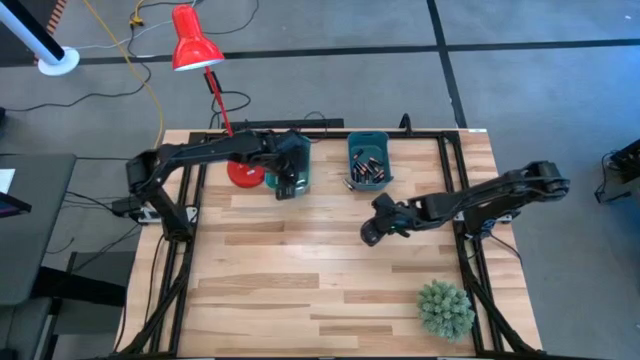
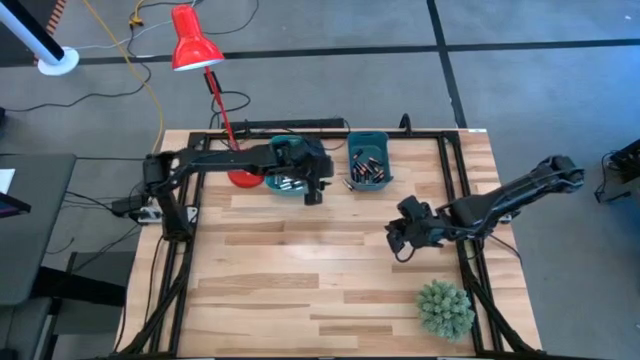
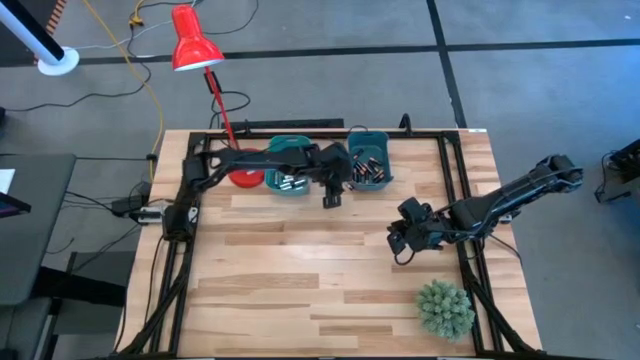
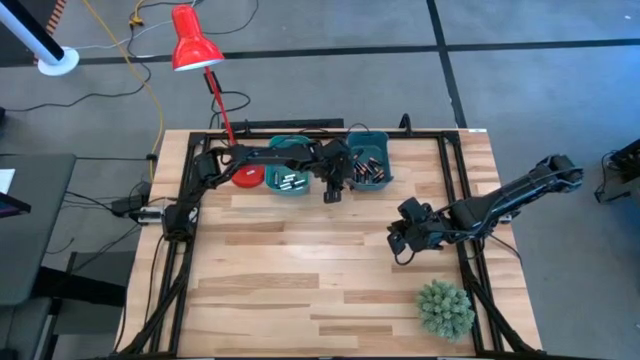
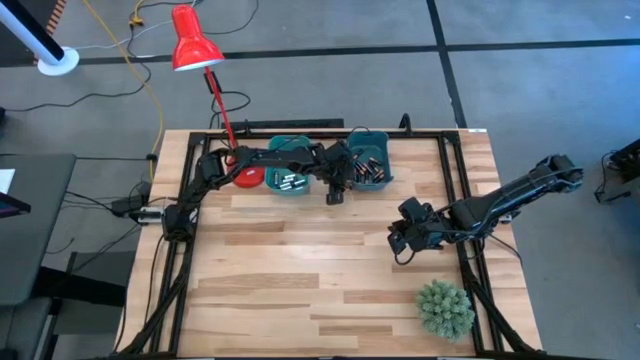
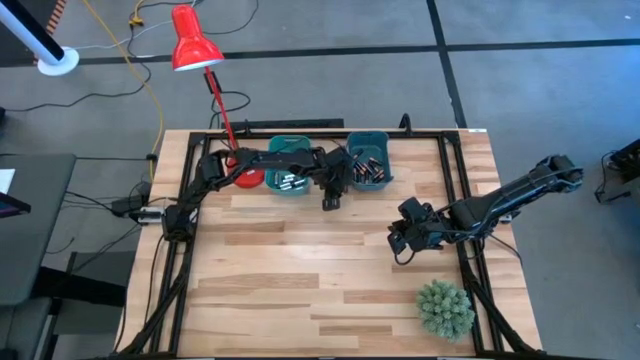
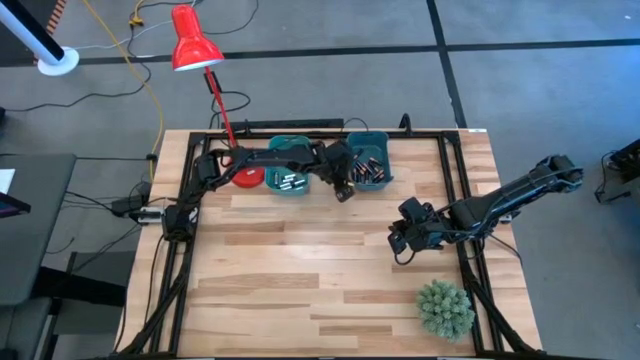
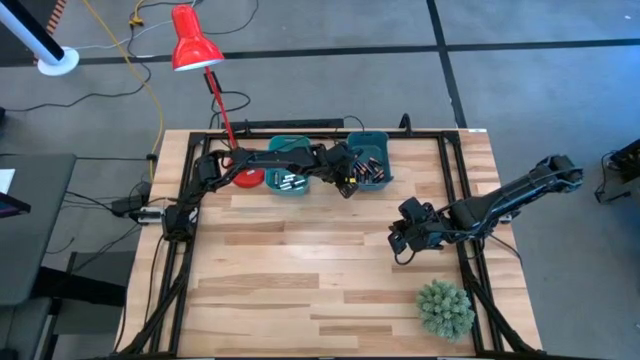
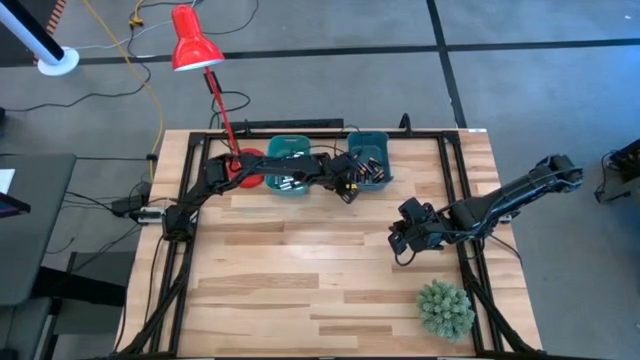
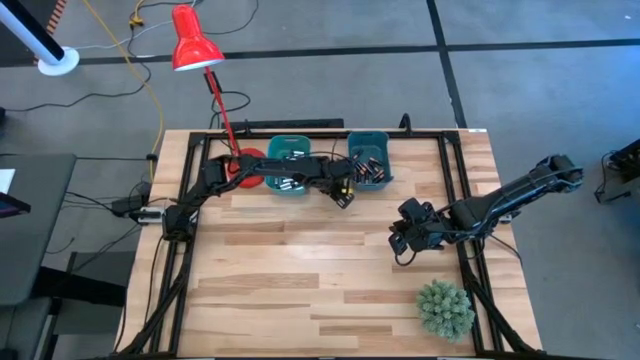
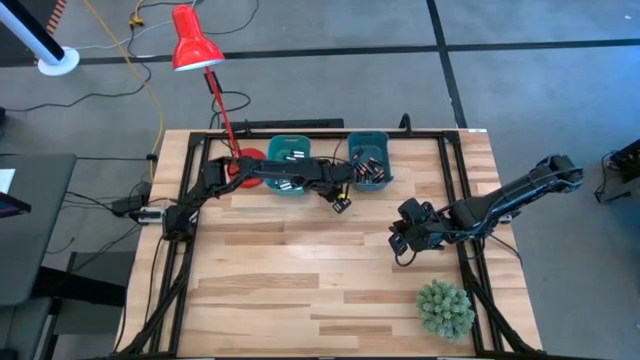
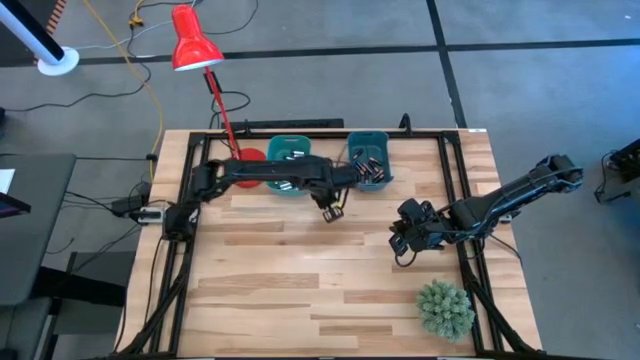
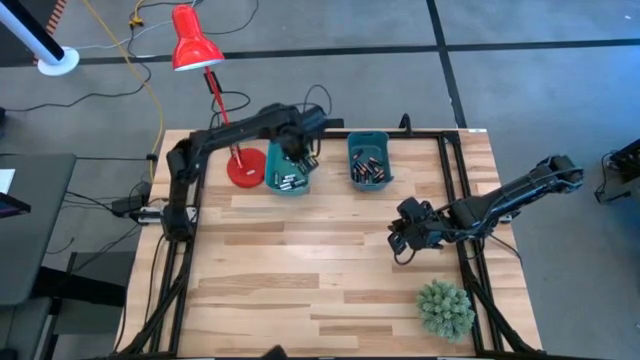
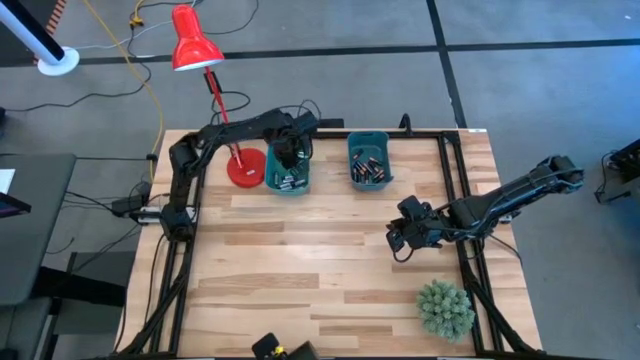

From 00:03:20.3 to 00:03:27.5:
Task: Sort batteries
Put the silver battery into the green bin

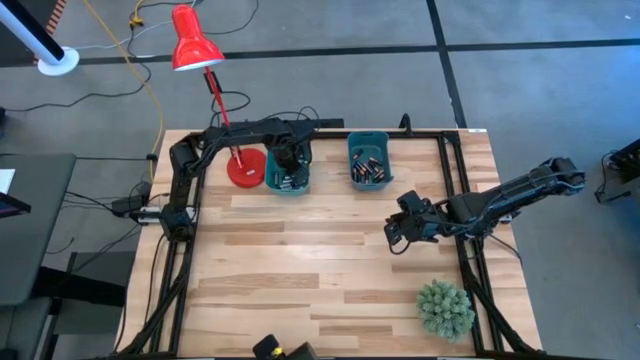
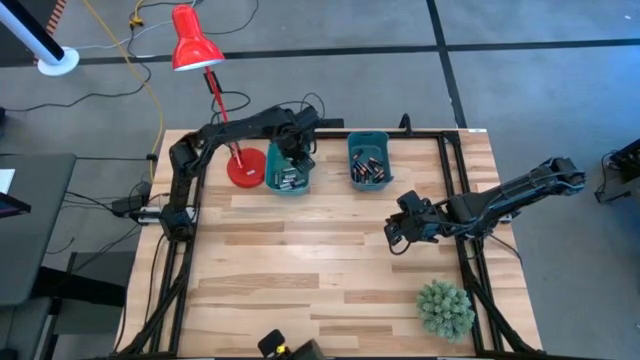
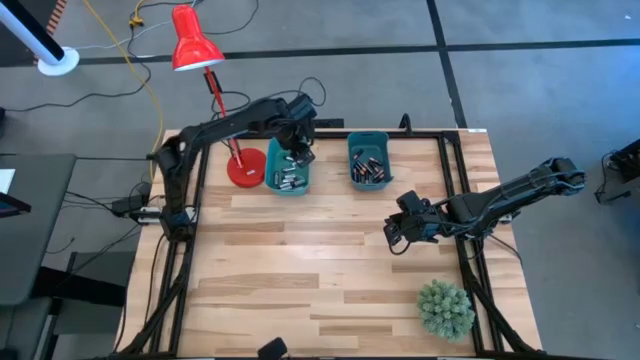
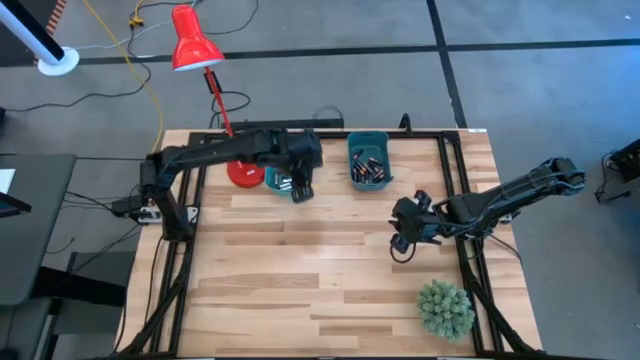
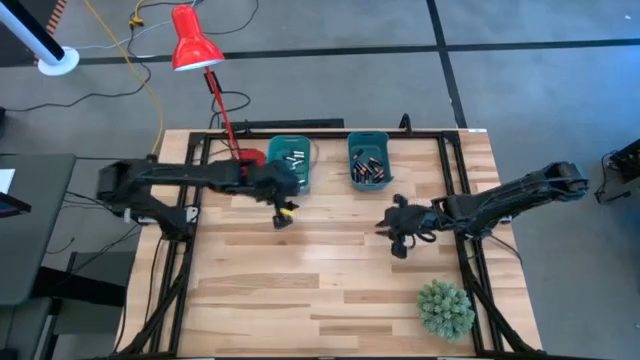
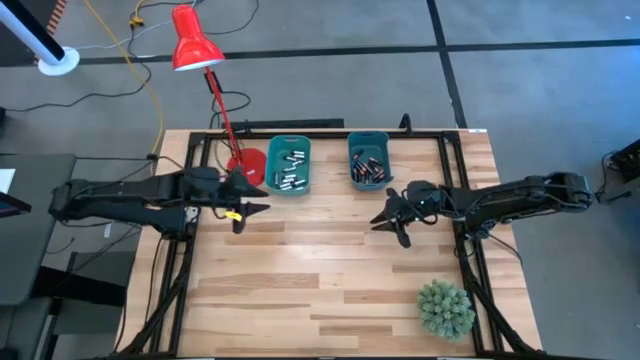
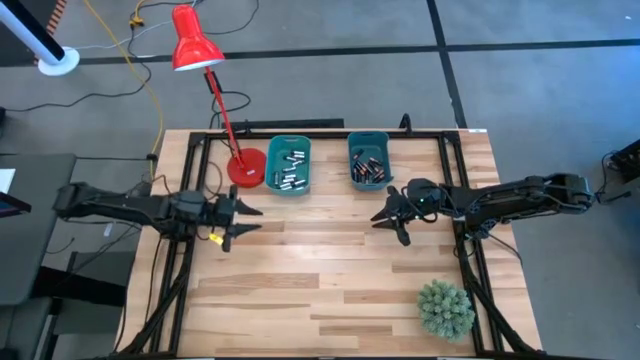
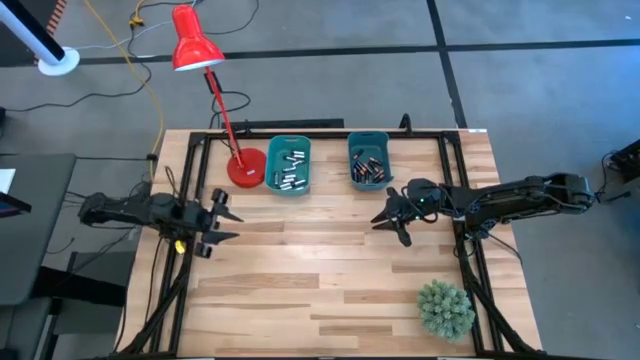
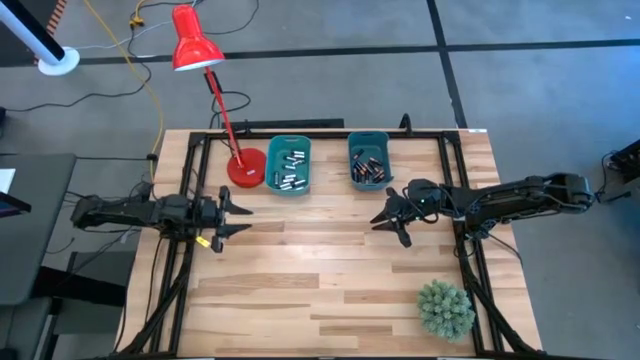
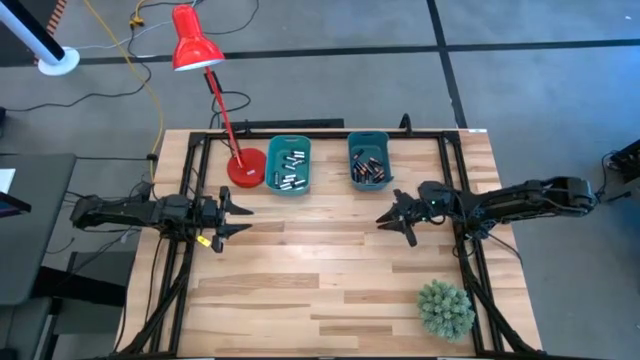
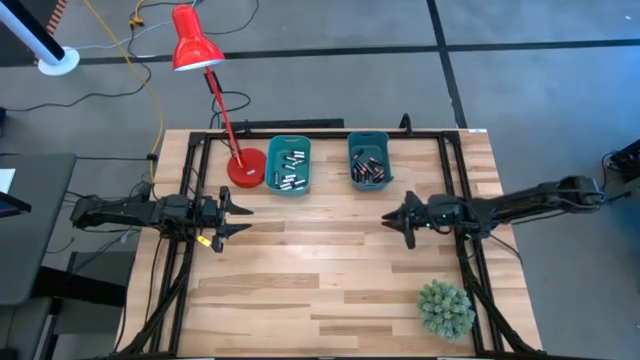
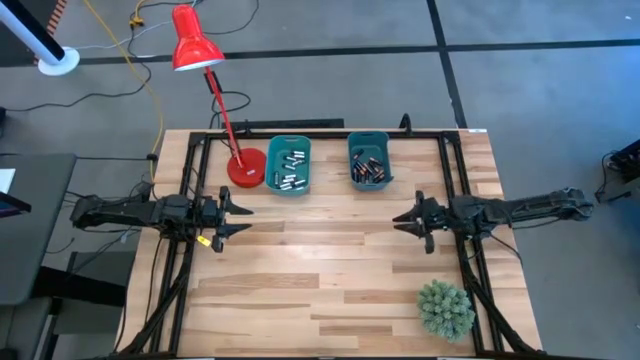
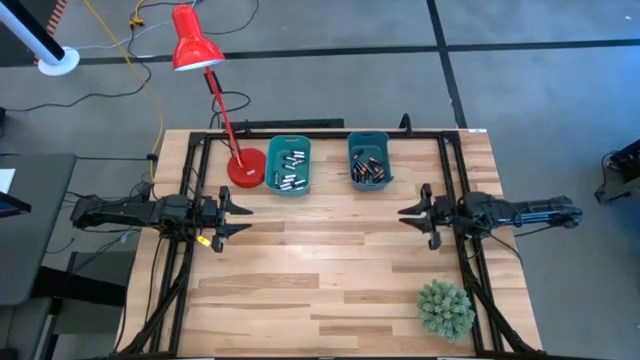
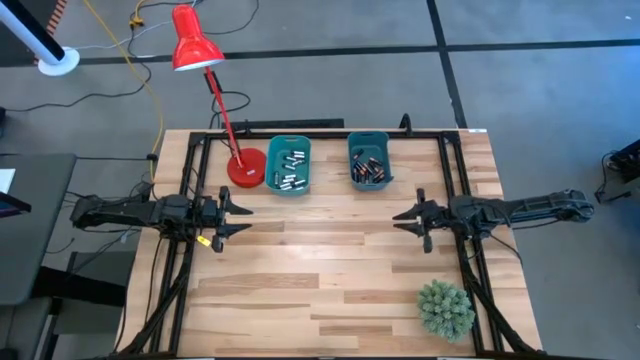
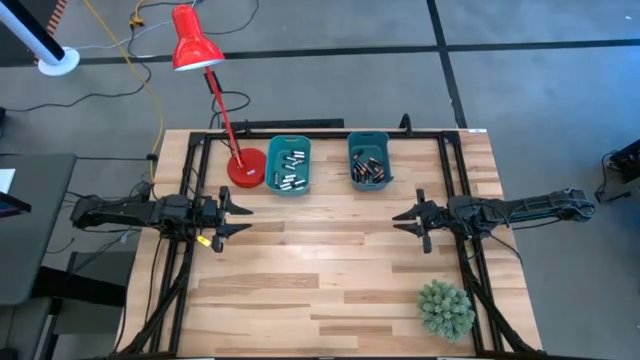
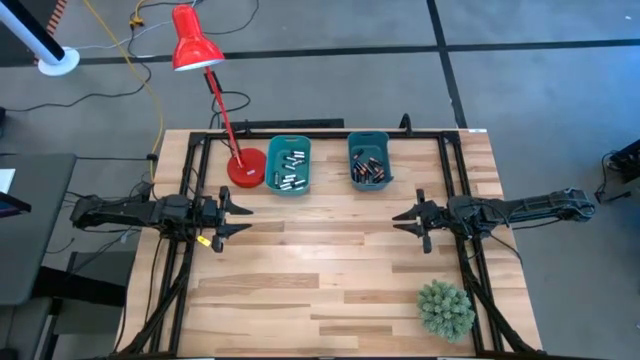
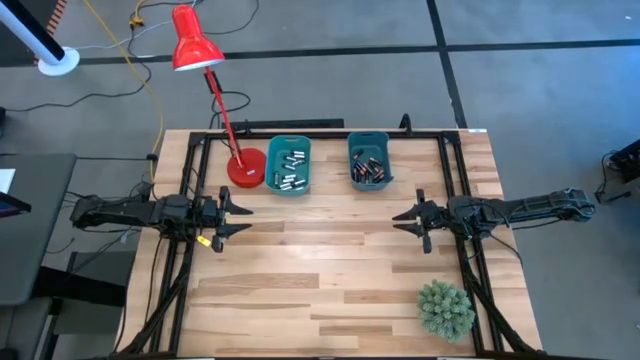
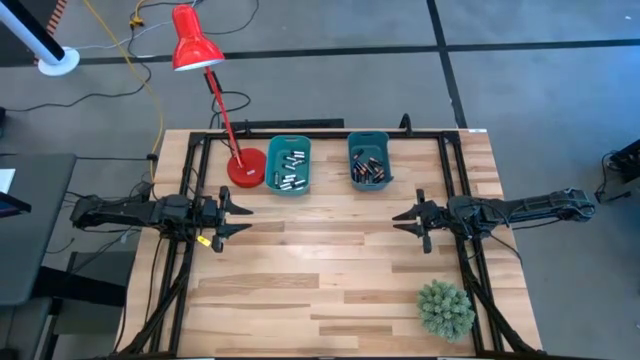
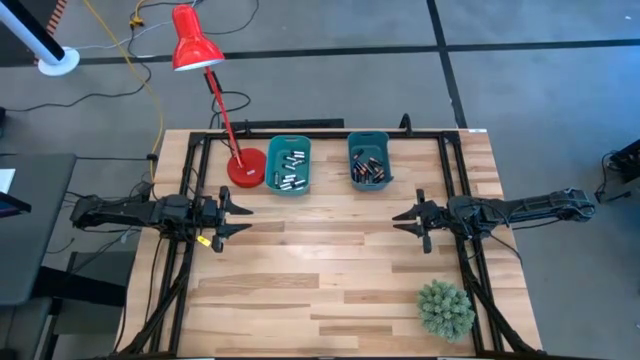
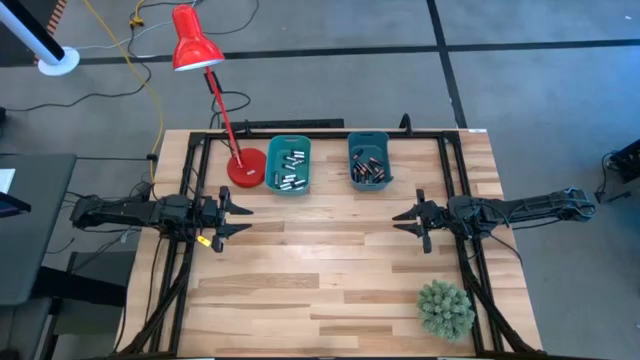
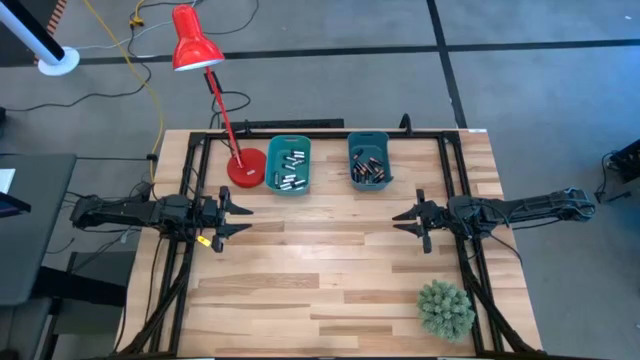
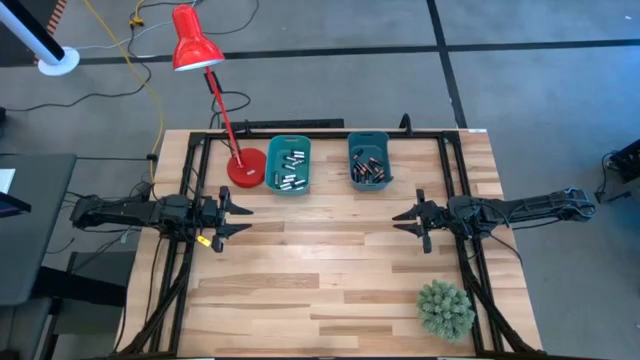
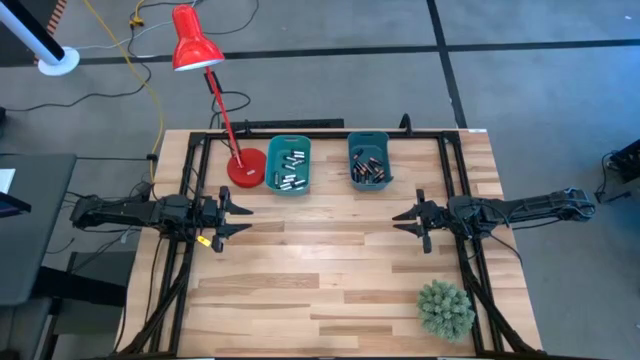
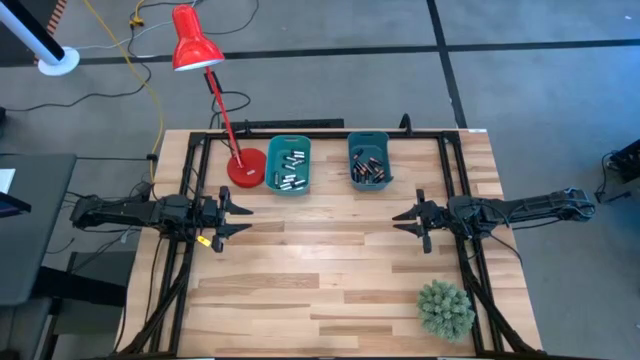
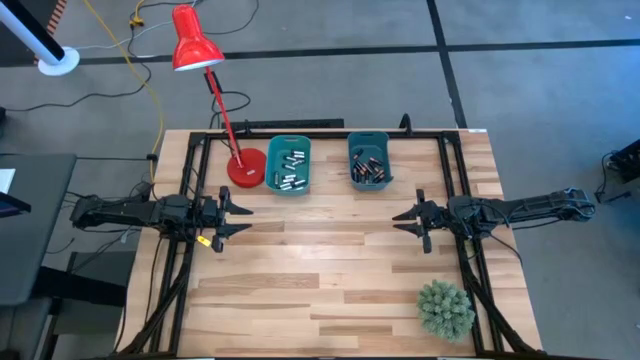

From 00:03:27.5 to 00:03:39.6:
Return to Home Position

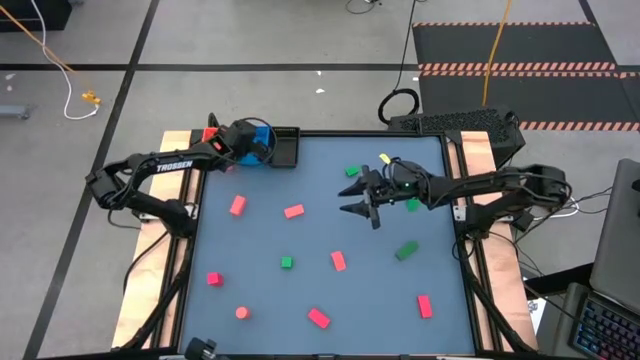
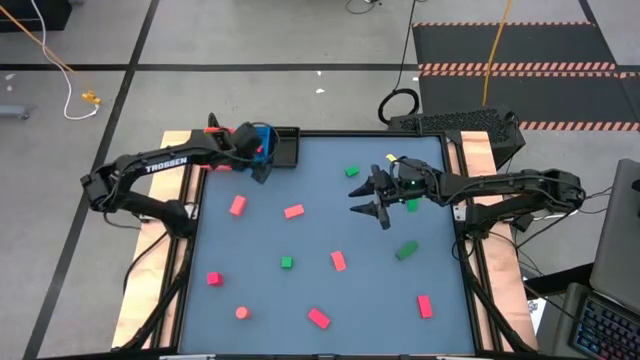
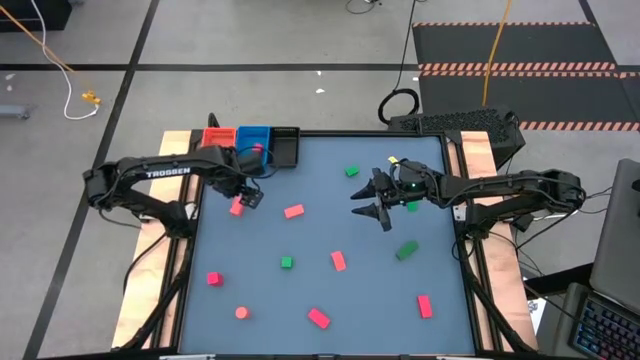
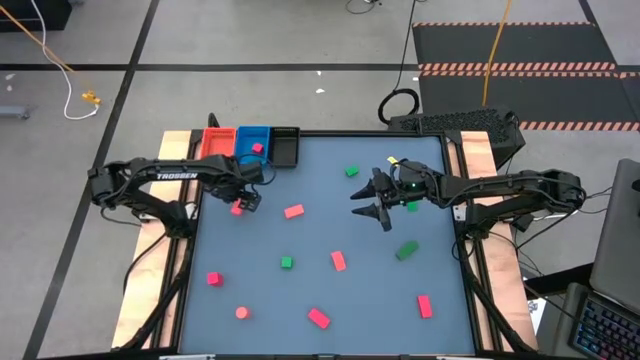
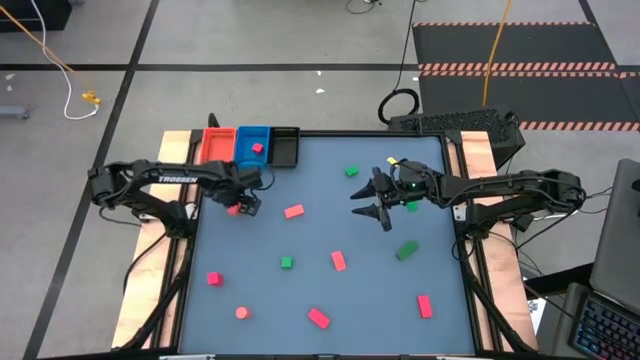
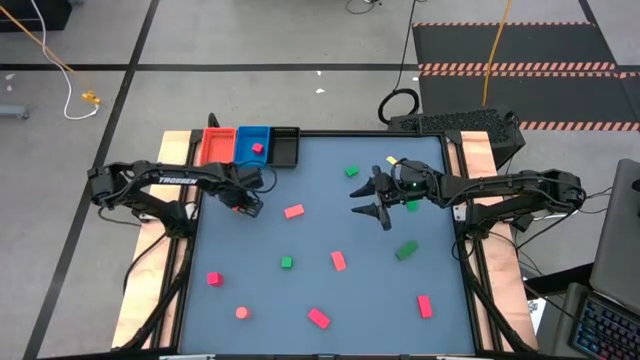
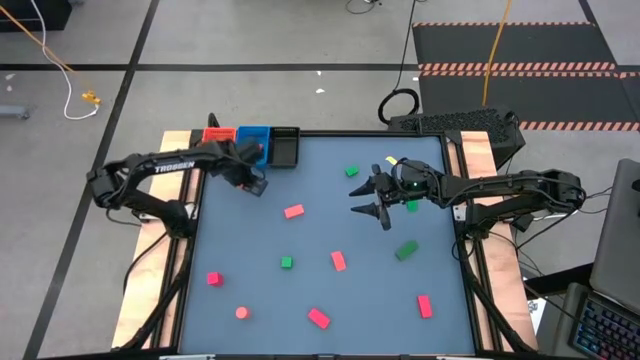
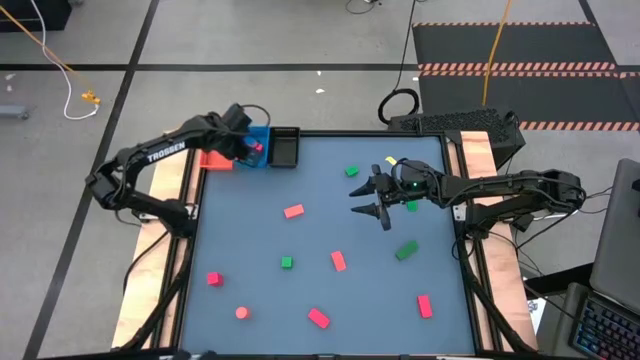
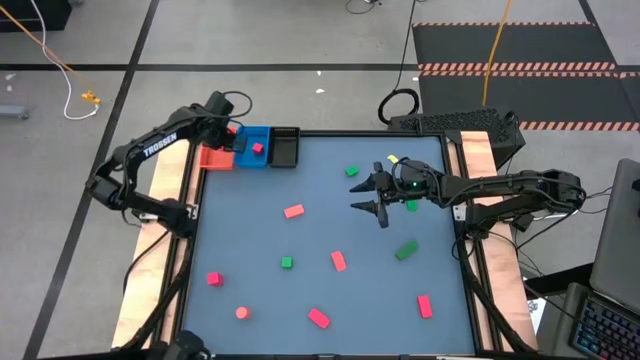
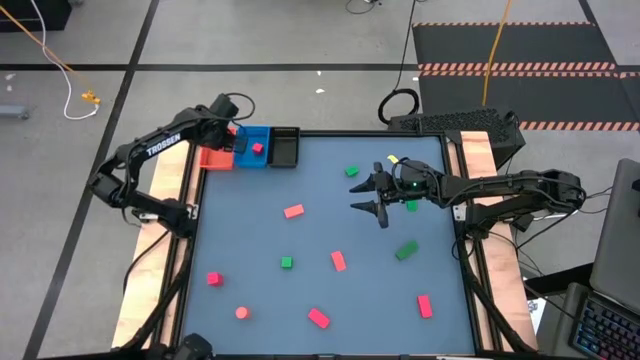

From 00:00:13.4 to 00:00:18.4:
Task: Sort & place blocks by color
Put the orange block into the orange bin
